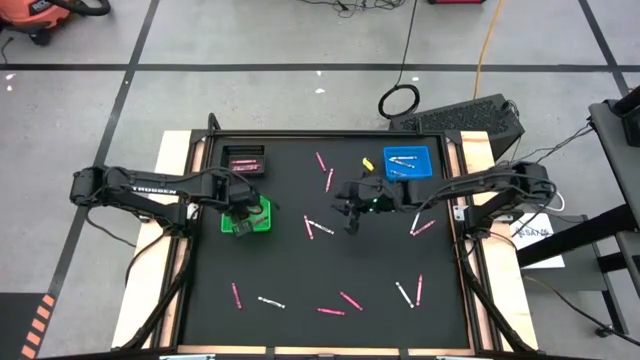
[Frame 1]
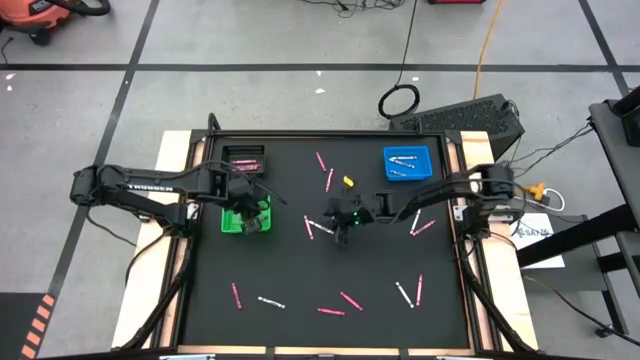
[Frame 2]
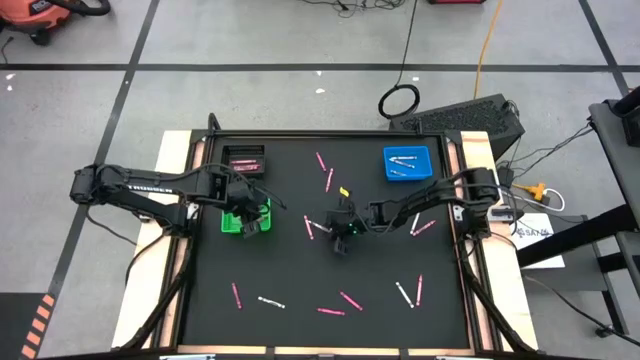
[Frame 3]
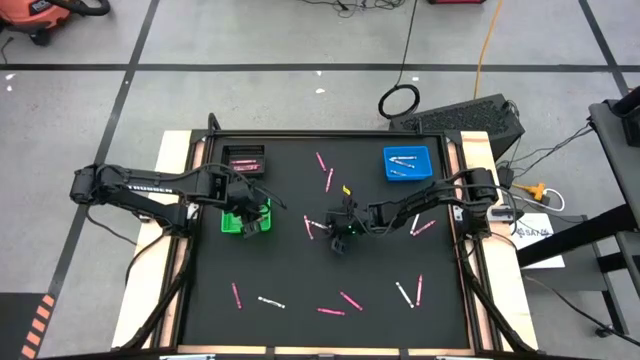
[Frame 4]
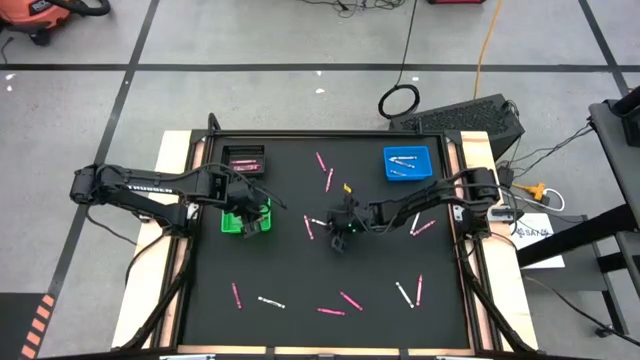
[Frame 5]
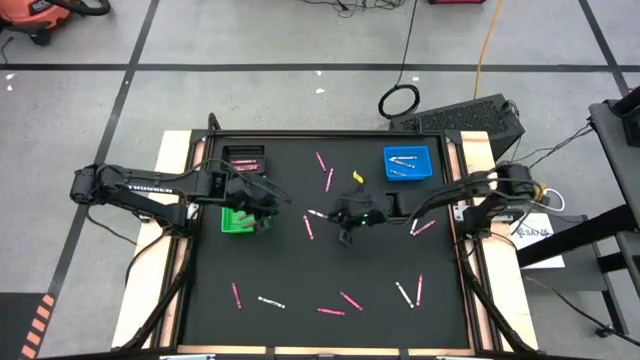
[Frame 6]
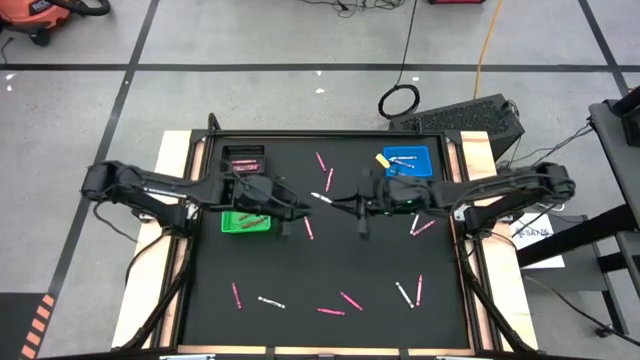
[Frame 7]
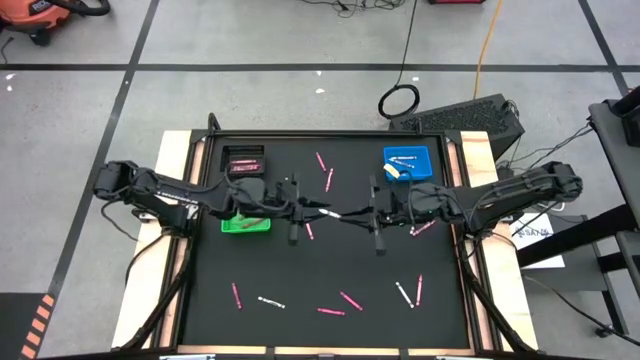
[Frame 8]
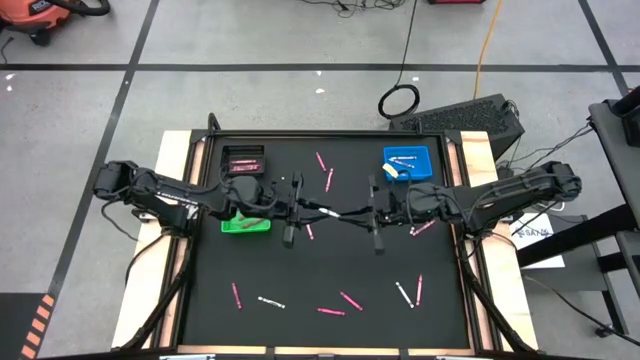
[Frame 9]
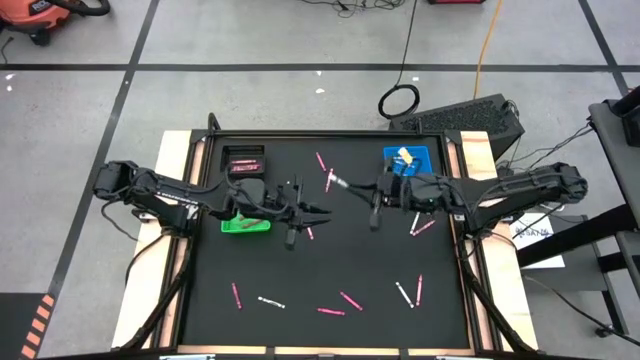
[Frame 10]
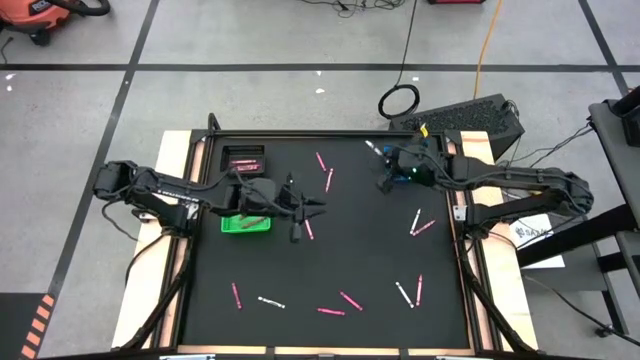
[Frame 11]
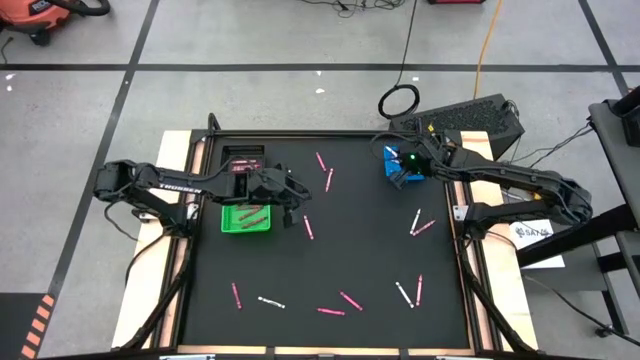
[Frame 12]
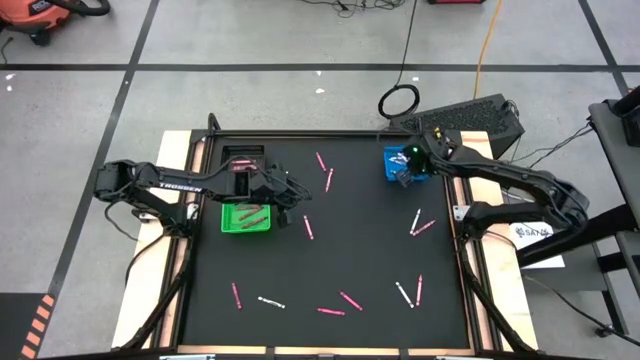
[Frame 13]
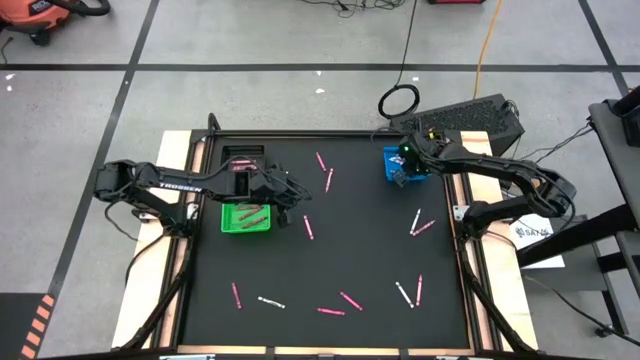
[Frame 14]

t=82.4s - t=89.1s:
Task: Sort crayons
Put the white crayon into the blue bin

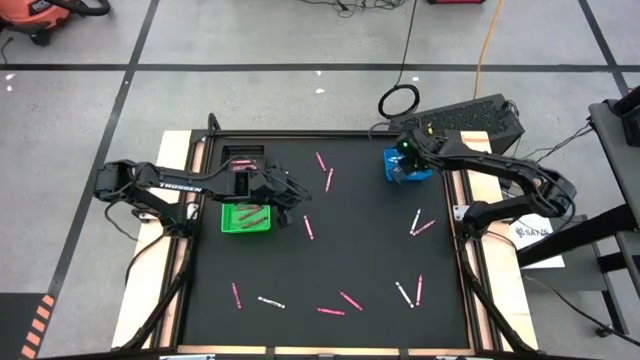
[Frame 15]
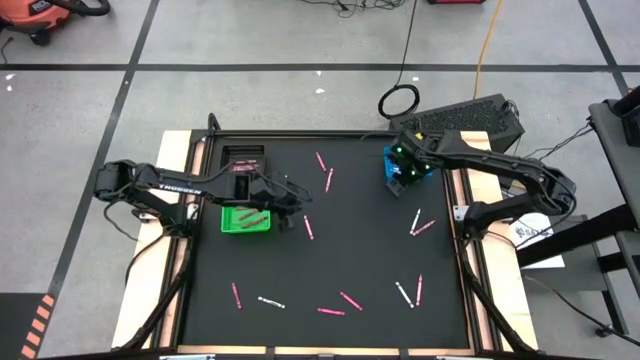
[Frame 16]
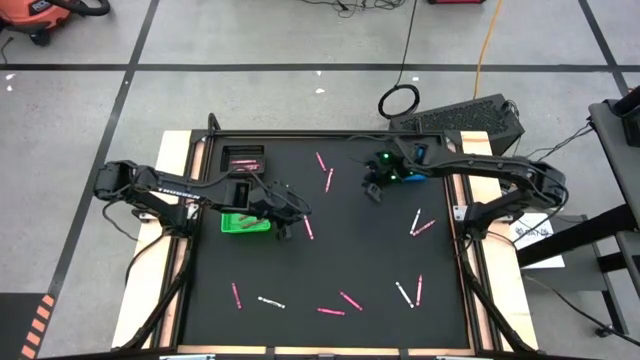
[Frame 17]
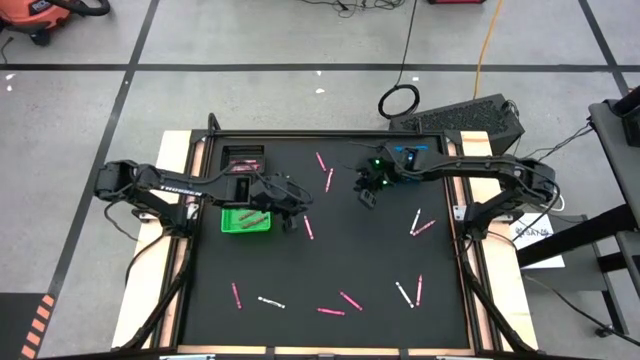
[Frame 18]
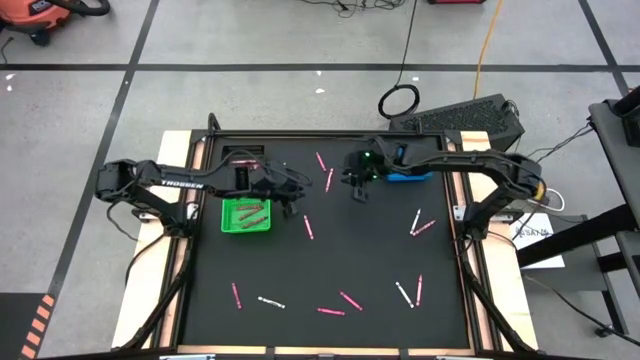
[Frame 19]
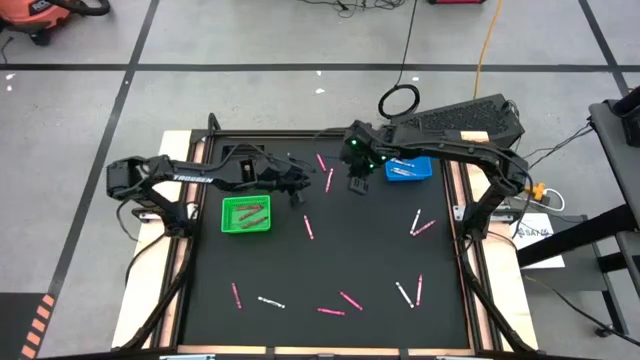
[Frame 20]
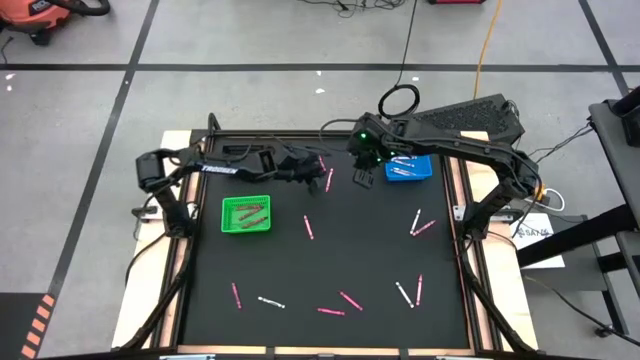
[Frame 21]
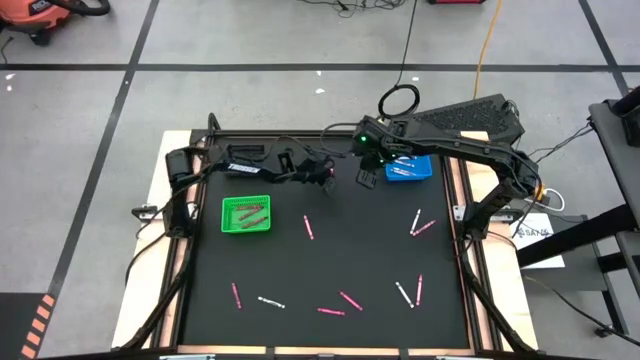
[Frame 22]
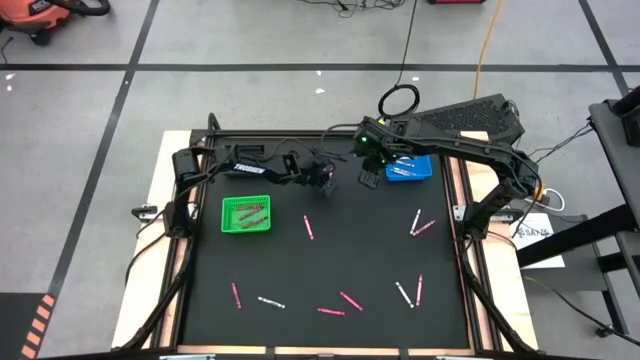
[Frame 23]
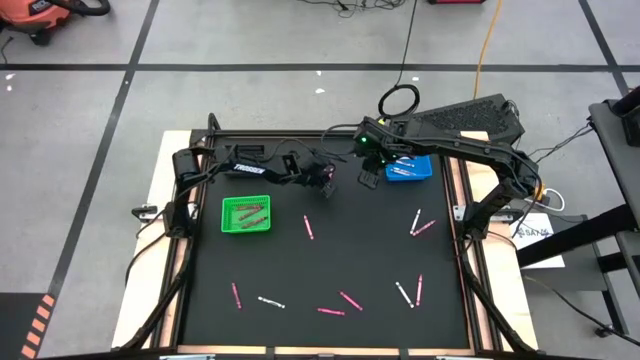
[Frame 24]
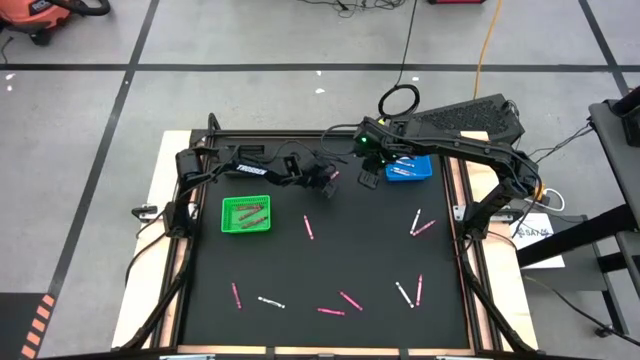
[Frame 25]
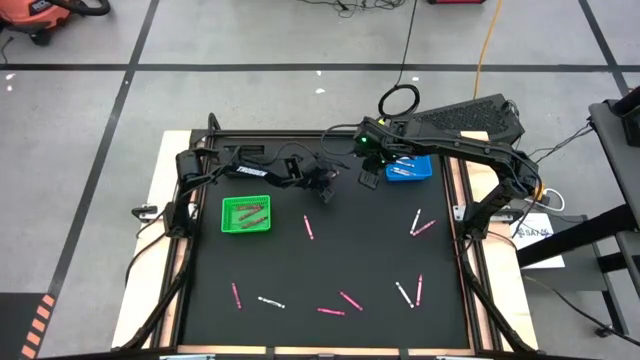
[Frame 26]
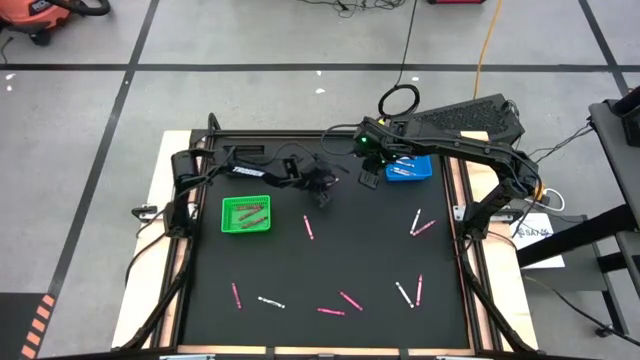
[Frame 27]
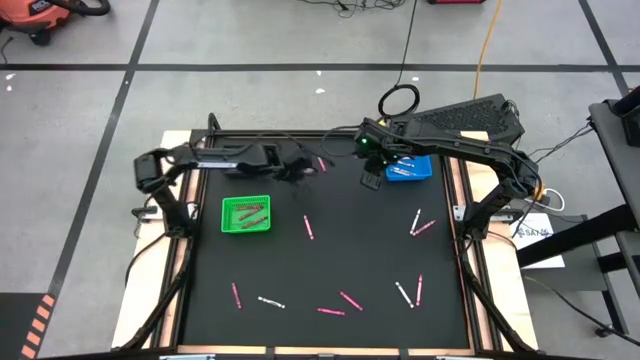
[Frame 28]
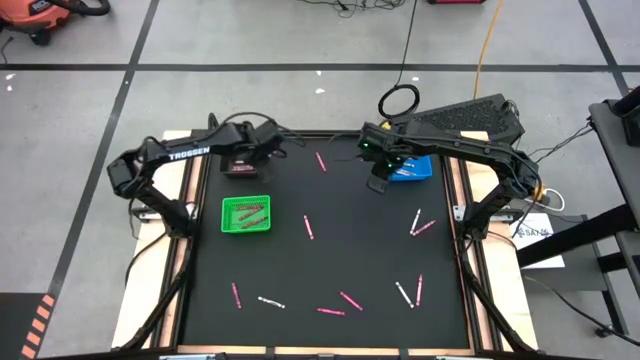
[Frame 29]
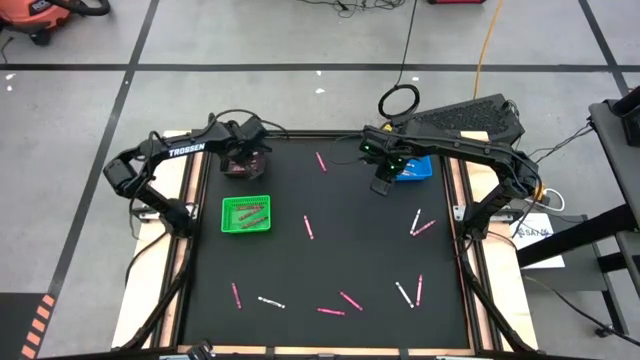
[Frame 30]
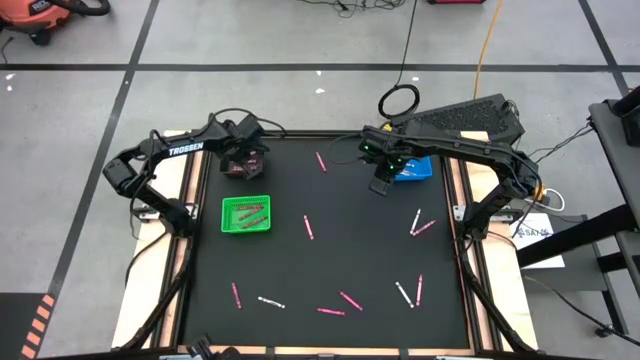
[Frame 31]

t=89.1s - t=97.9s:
Put the pink crayon into the black bin

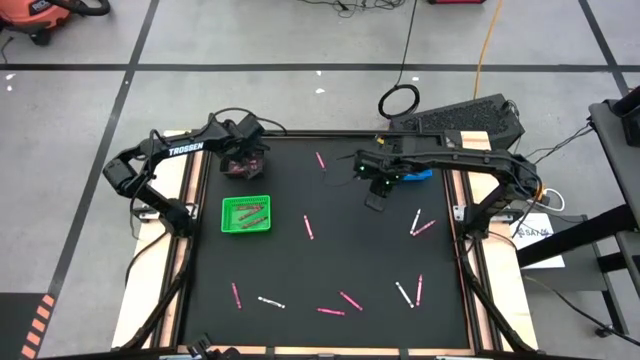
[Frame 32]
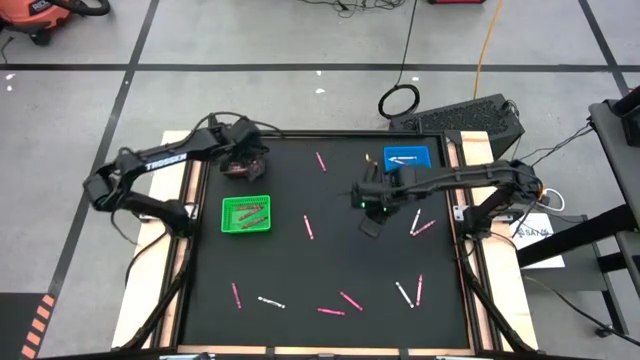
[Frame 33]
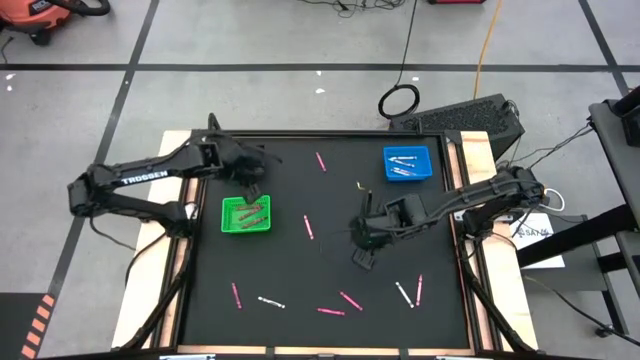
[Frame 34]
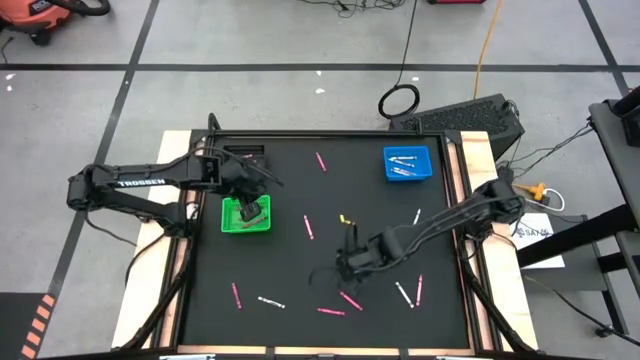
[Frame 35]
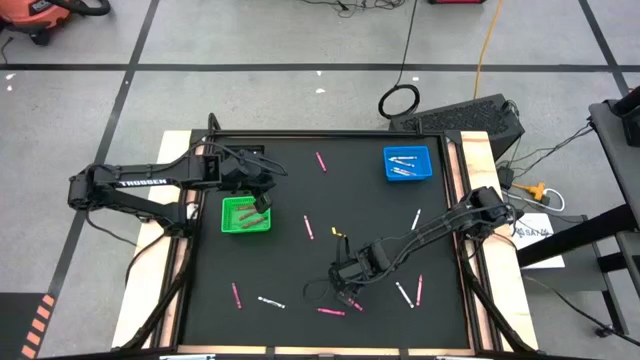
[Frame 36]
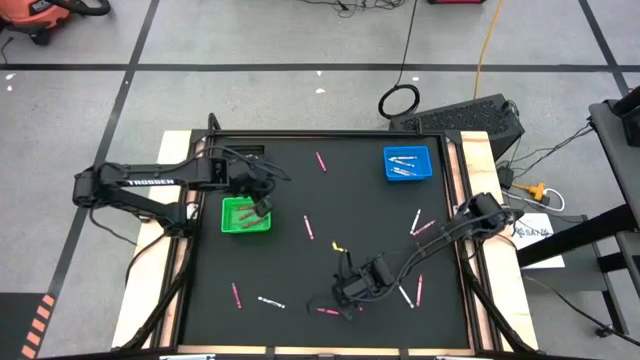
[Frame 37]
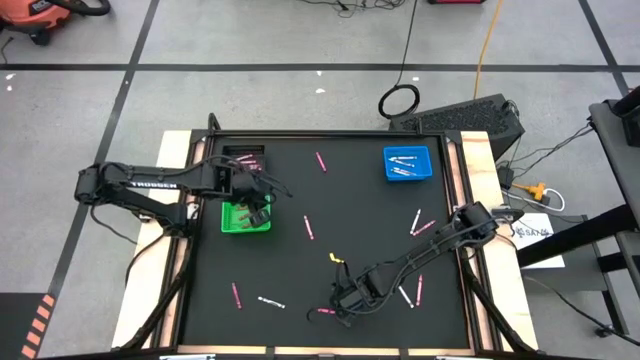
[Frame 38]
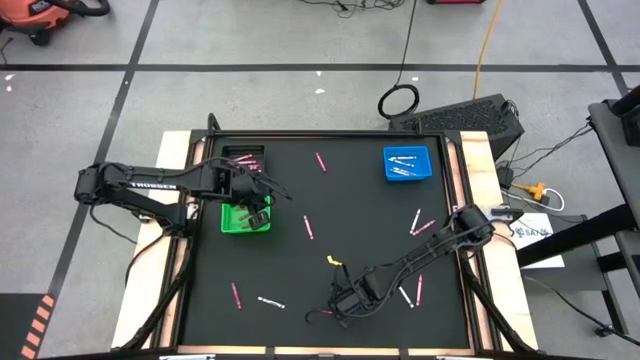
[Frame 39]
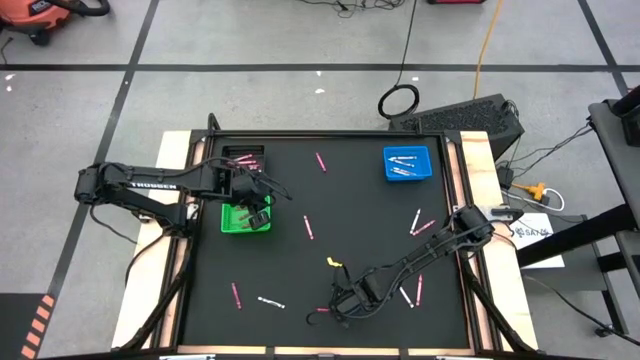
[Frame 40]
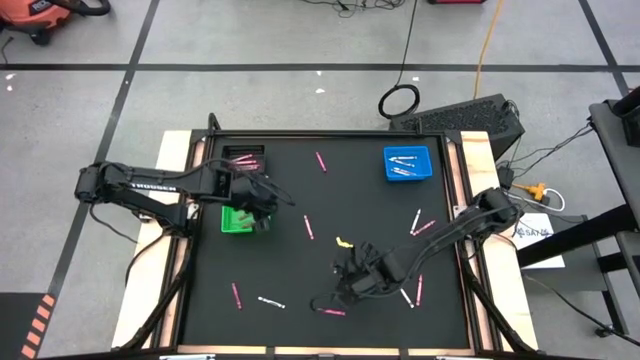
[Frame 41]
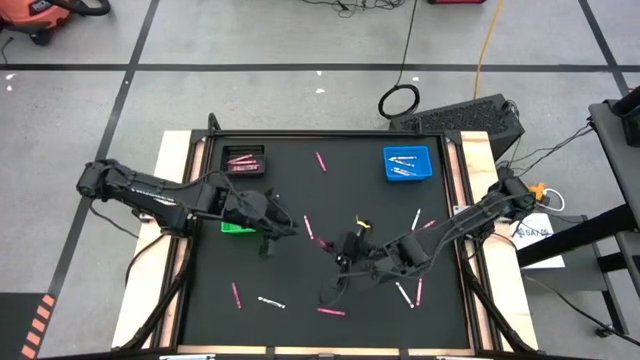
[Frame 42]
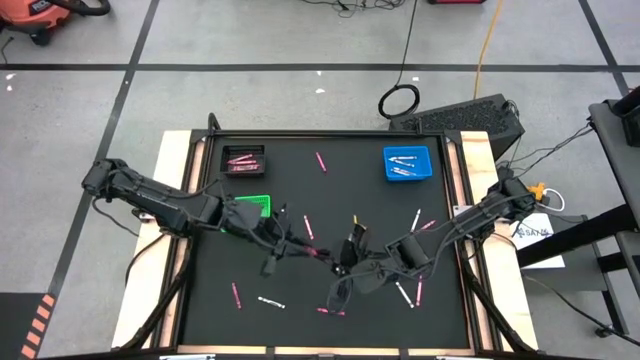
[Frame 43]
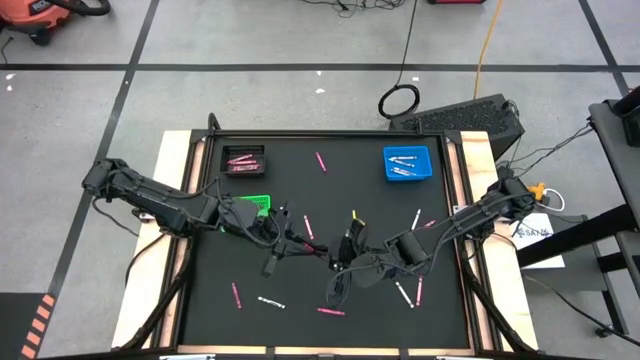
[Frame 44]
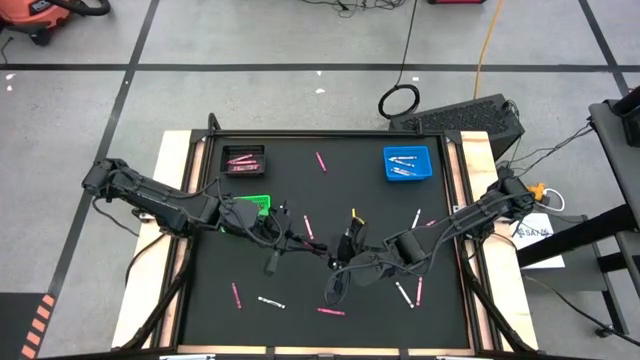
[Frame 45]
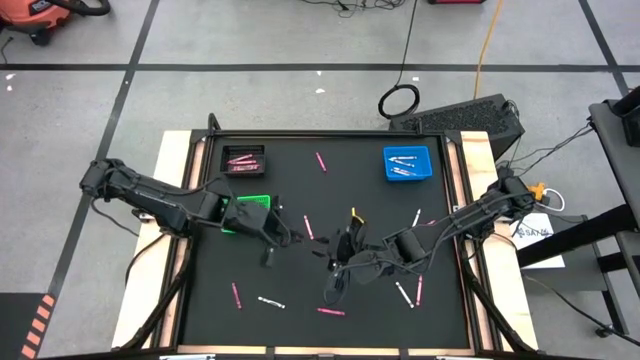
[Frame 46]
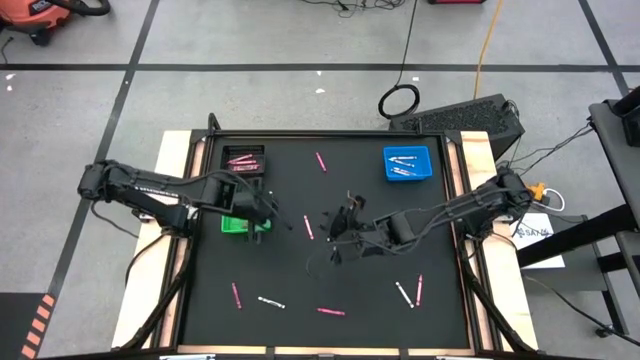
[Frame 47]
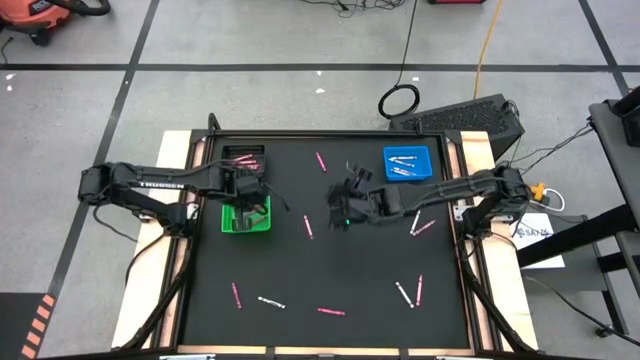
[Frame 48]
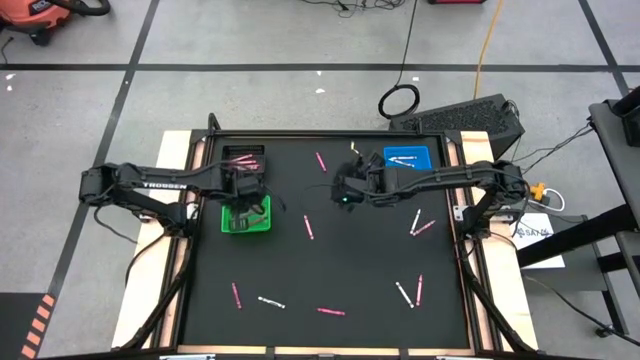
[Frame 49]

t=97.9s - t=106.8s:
Put the red crayon into the green bin
